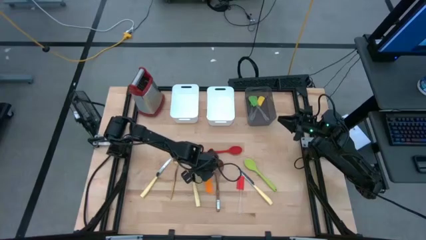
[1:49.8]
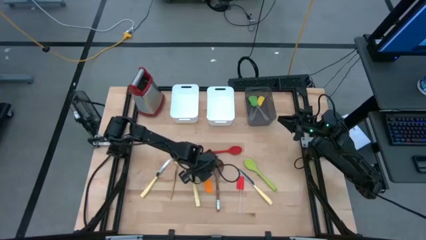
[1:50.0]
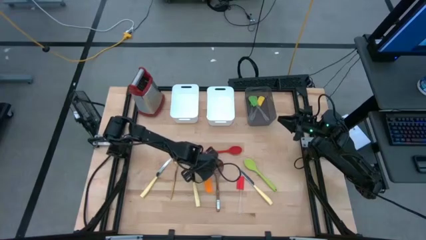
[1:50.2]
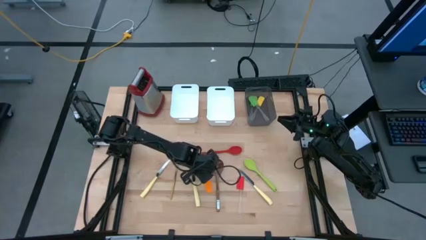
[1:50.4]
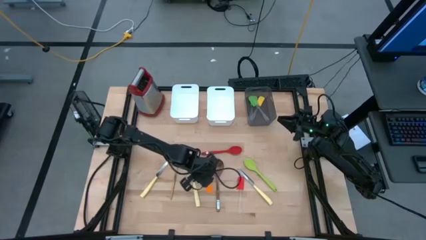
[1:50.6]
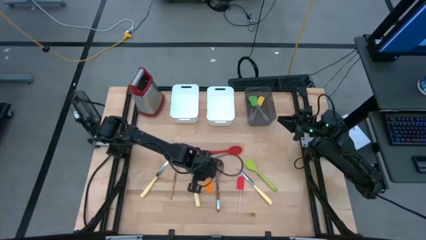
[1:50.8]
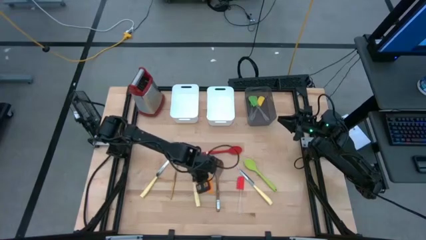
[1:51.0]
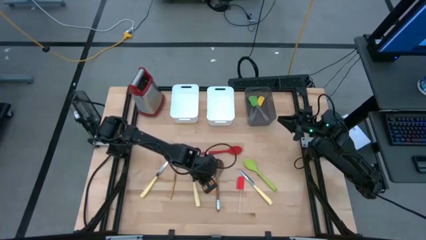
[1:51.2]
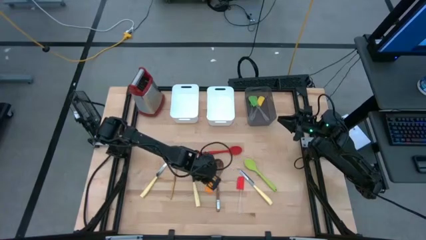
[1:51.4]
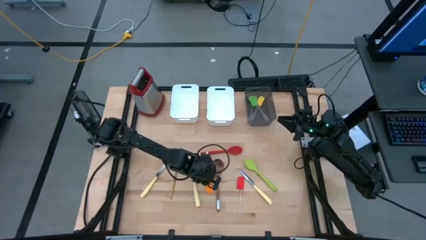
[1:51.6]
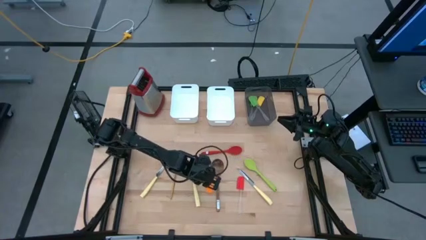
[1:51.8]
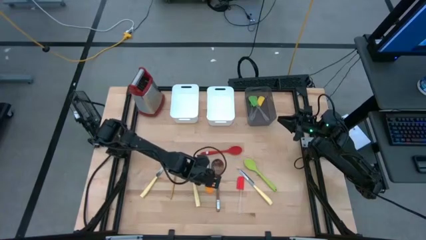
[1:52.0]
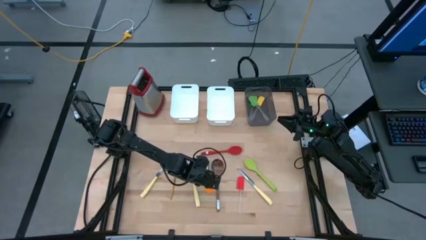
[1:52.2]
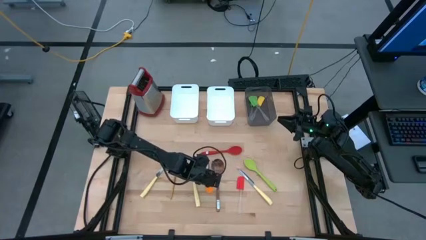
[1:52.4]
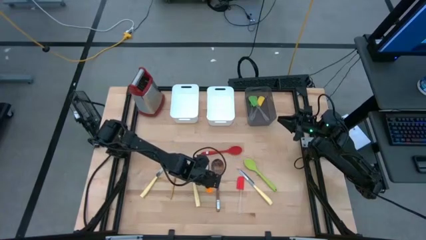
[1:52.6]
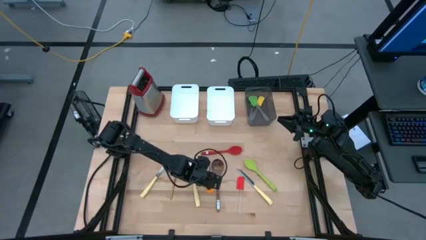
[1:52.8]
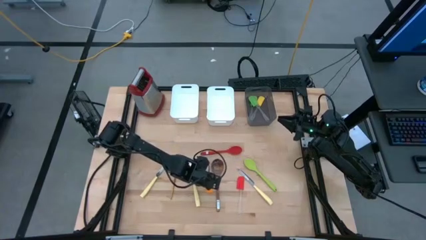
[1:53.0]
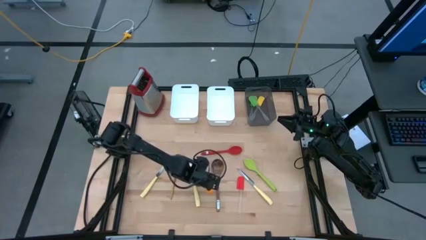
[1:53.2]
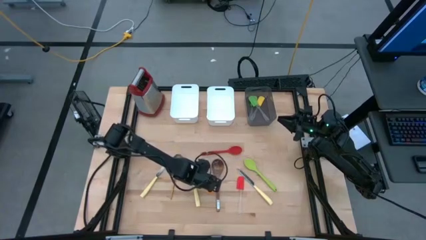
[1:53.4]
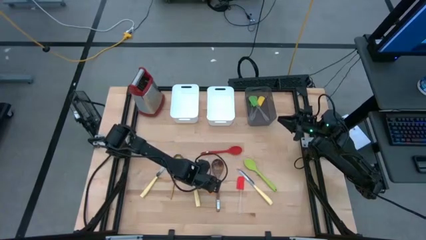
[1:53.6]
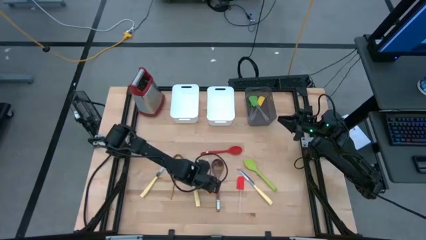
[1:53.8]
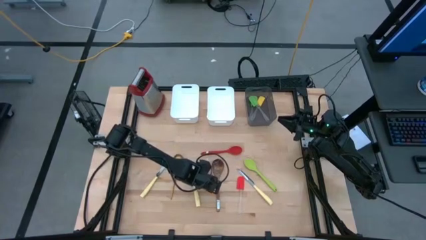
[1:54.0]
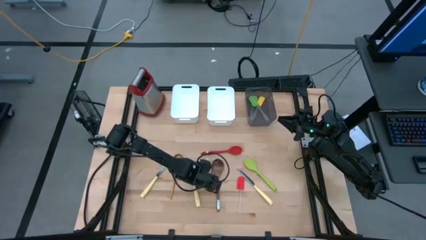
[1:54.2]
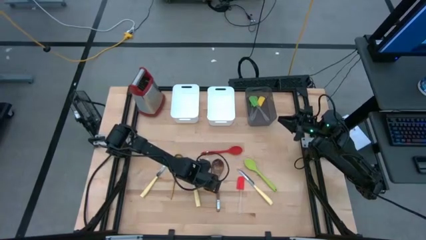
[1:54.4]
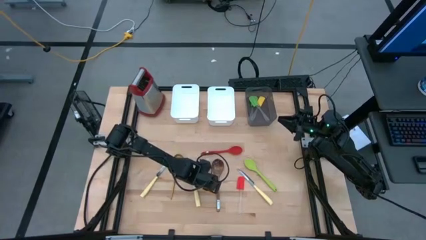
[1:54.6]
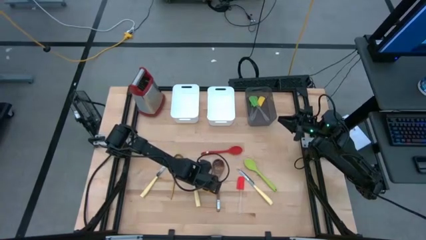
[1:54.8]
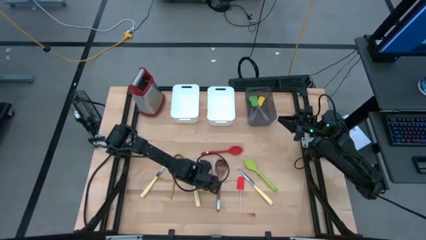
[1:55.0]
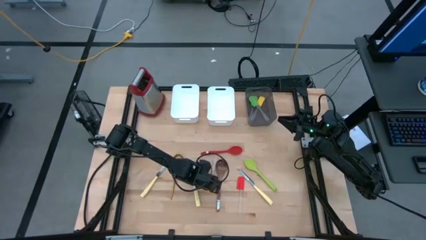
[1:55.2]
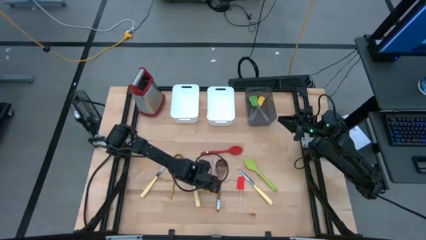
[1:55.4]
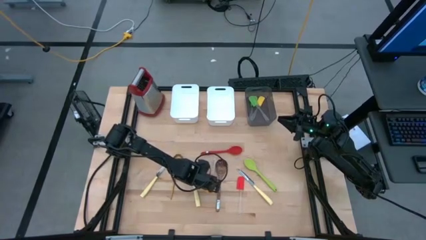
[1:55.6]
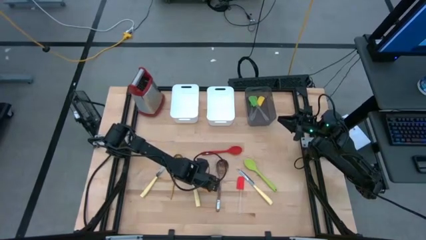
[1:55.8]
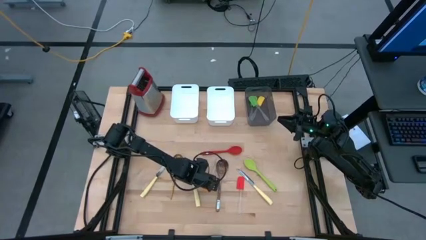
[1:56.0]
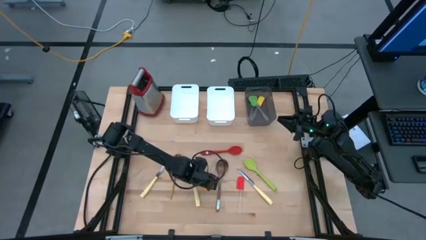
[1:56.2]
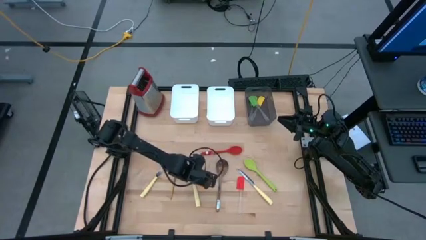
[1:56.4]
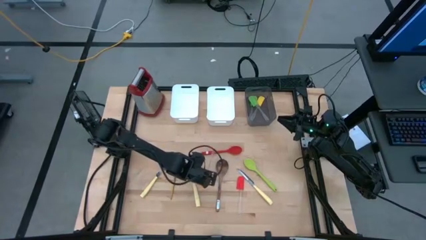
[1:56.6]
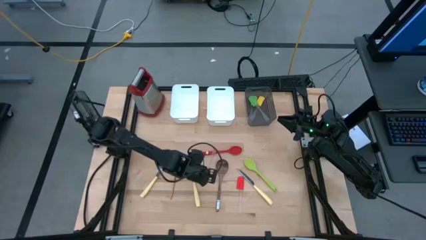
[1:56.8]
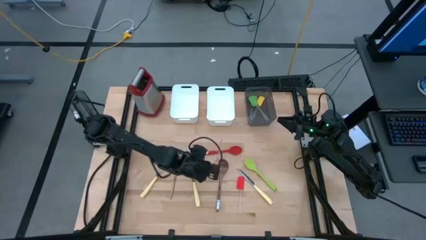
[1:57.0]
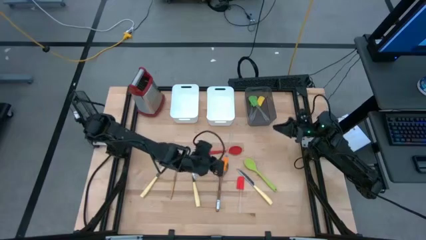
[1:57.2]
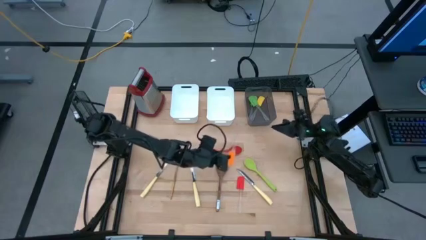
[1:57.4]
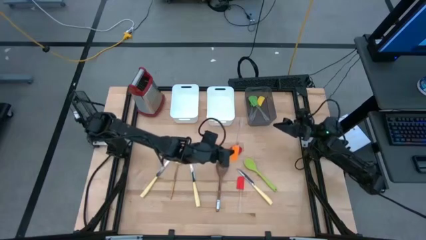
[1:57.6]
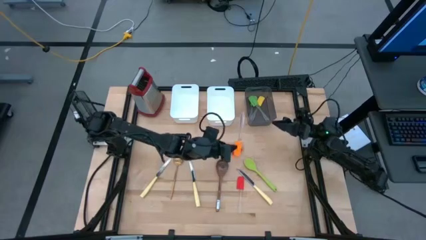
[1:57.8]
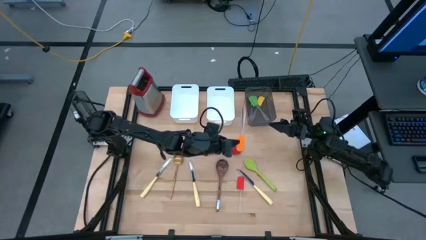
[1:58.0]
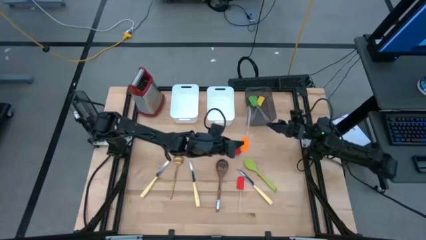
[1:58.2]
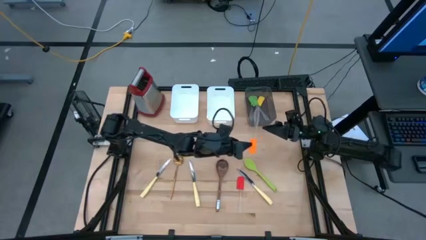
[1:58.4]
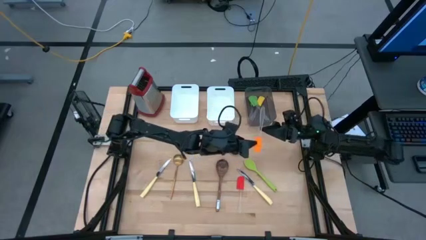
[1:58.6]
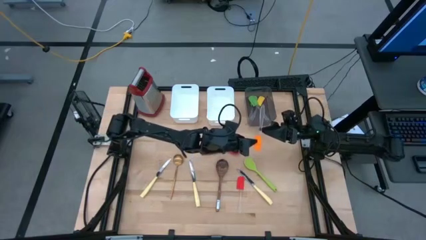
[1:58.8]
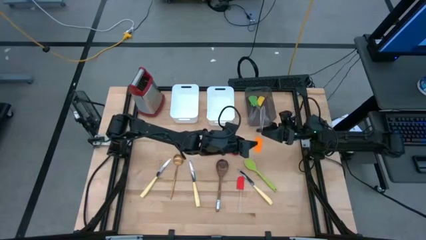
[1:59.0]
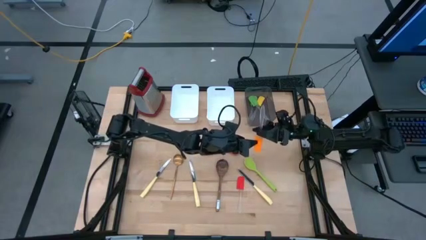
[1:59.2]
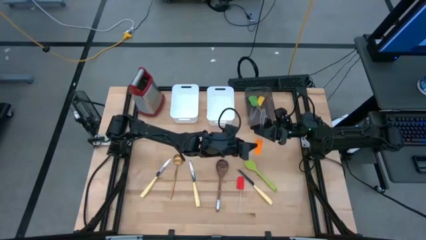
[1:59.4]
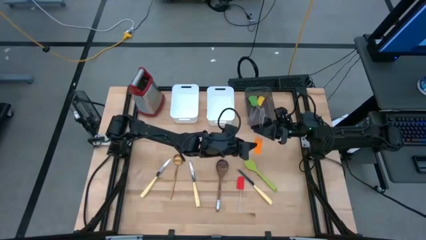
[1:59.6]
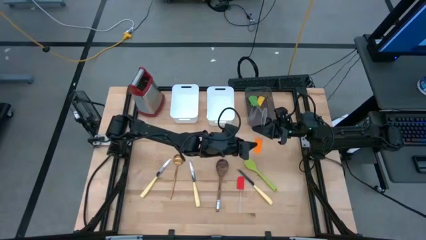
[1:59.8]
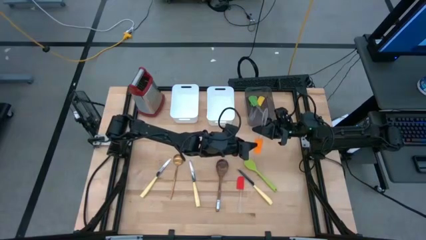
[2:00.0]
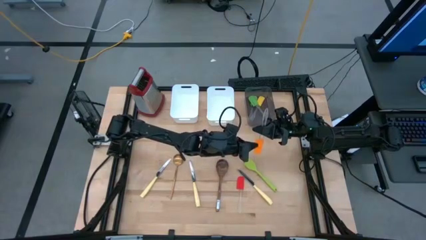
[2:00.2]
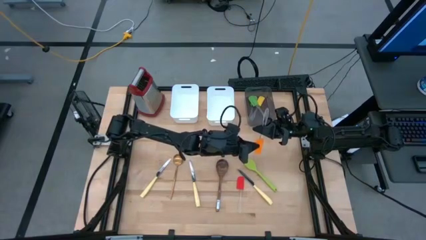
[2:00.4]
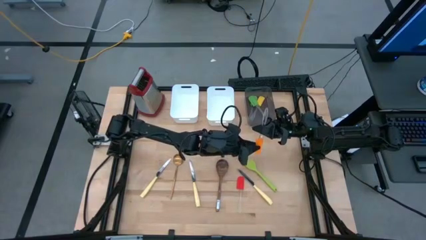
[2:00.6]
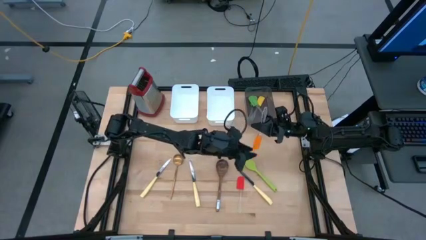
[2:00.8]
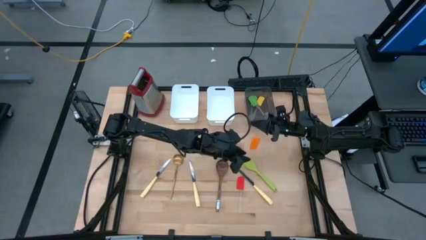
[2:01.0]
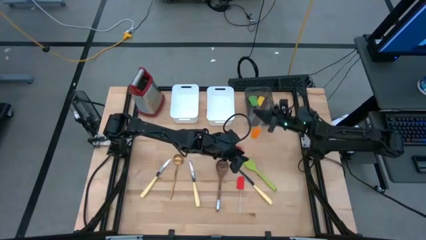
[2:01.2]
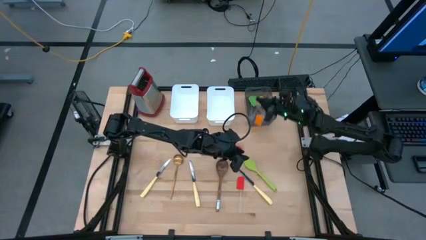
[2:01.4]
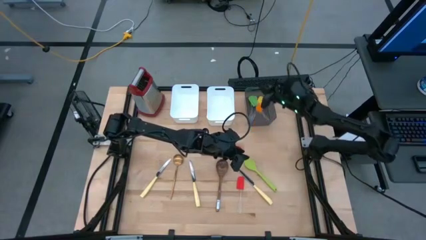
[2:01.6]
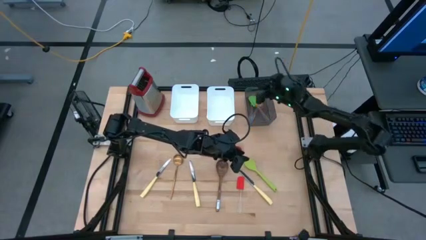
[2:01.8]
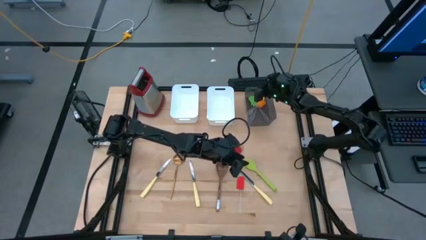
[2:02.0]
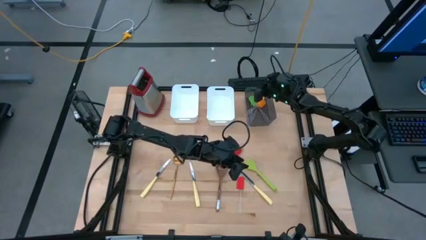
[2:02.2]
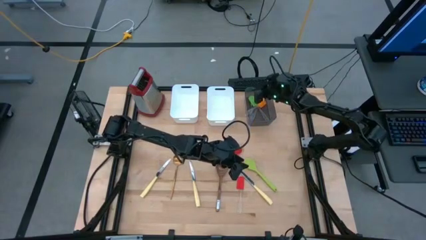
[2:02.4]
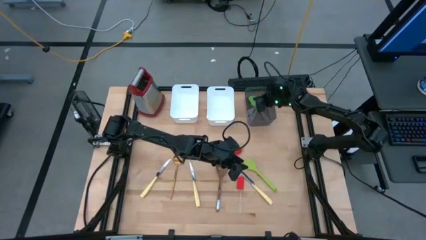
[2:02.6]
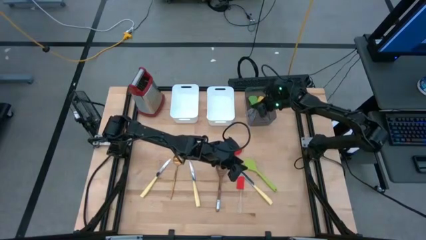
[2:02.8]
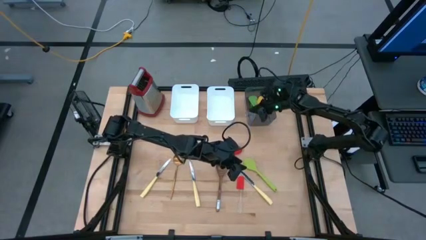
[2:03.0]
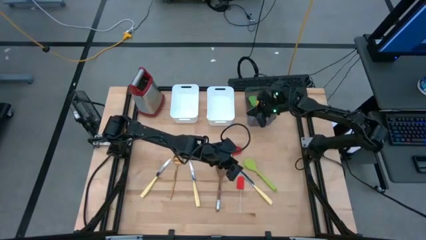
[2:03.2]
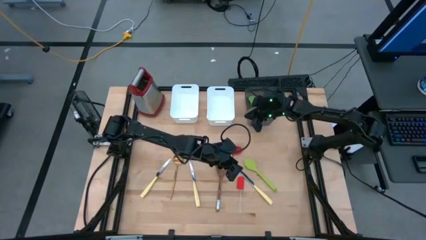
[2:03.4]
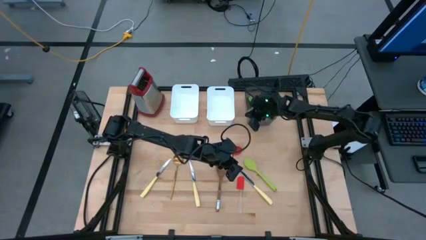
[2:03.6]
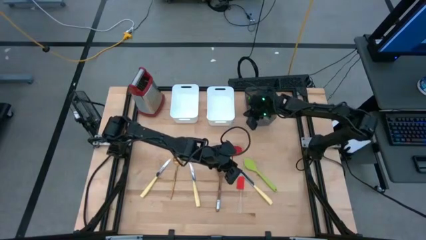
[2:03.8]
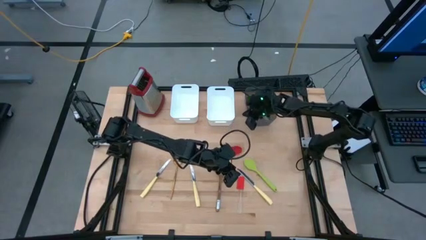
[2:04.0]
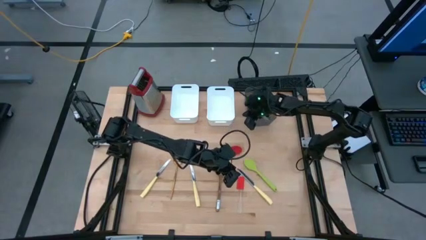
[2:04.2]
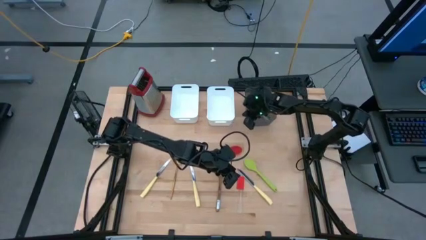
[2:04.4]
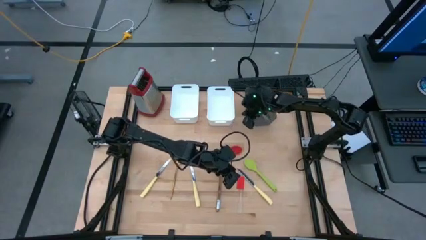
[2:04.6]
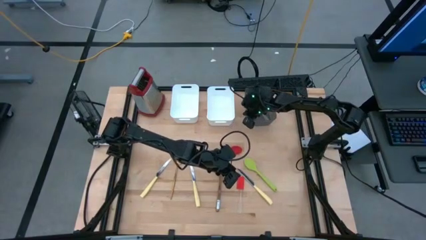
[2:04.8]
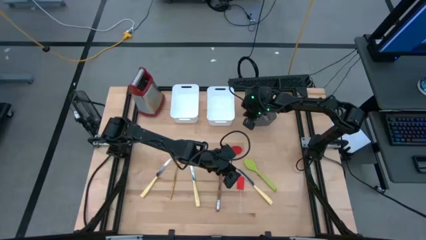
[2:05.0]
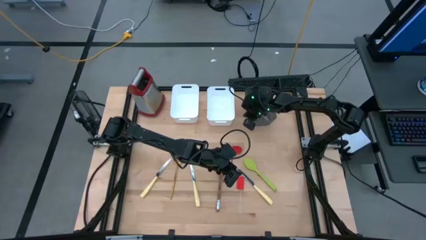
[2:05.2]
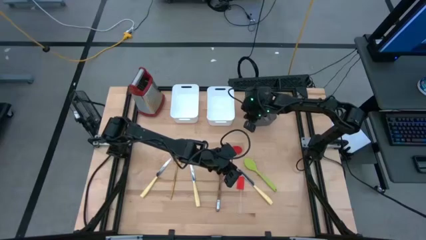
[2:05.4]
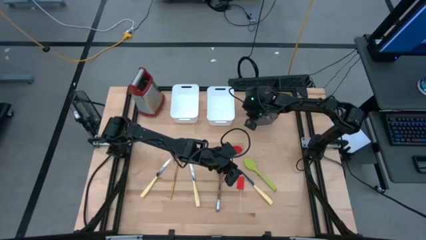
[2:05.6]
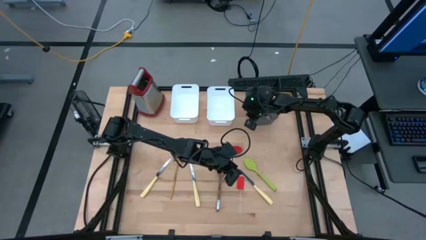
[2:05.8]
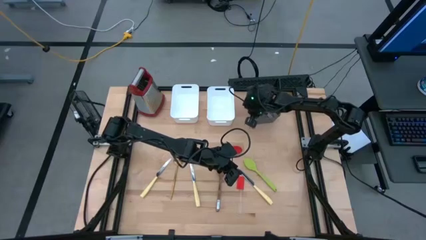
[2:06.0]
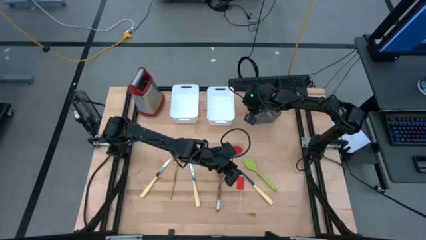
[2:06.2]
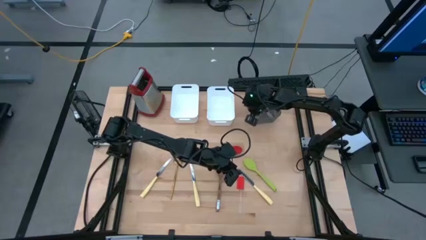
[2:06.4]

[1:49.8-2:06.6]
Task: Pick & Place Kitchen Items
Put the orange silicone spatula into the black bin
